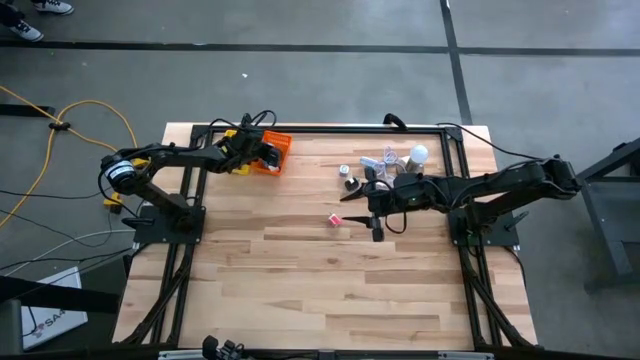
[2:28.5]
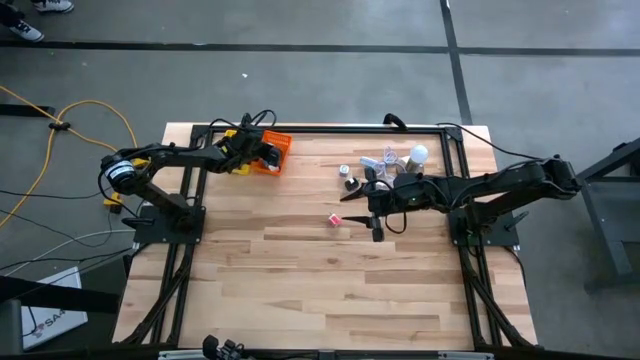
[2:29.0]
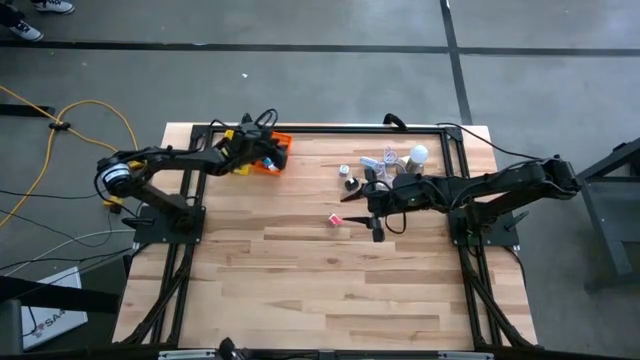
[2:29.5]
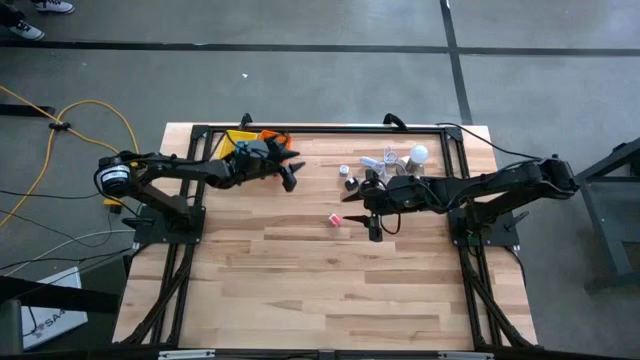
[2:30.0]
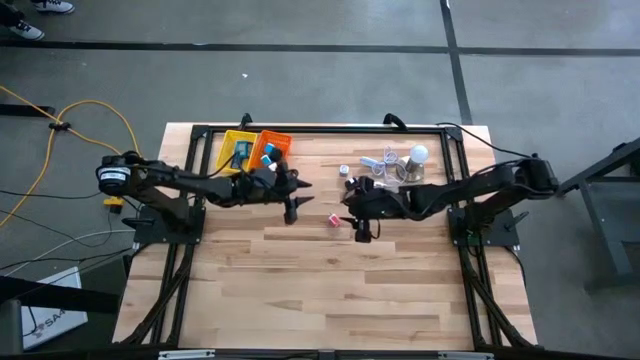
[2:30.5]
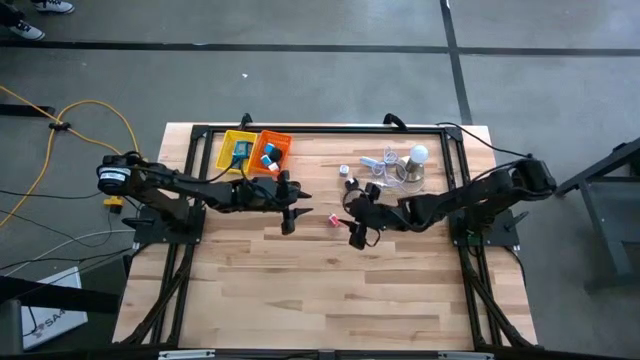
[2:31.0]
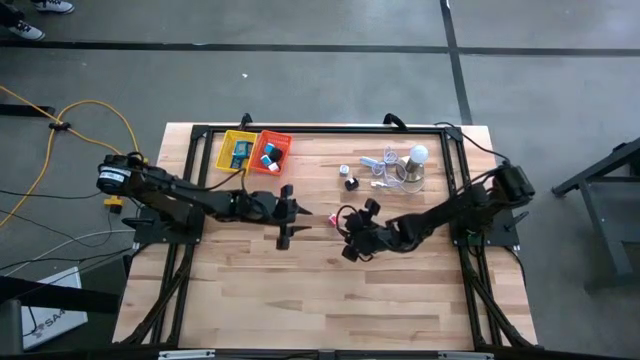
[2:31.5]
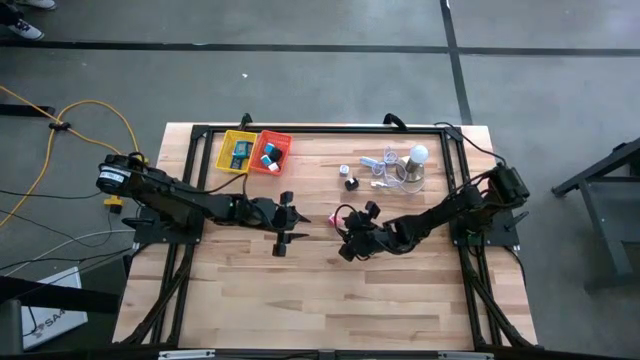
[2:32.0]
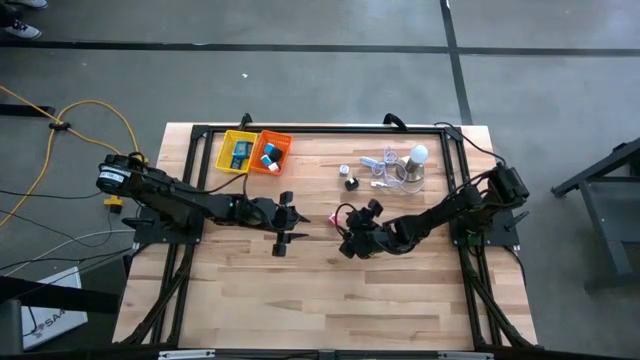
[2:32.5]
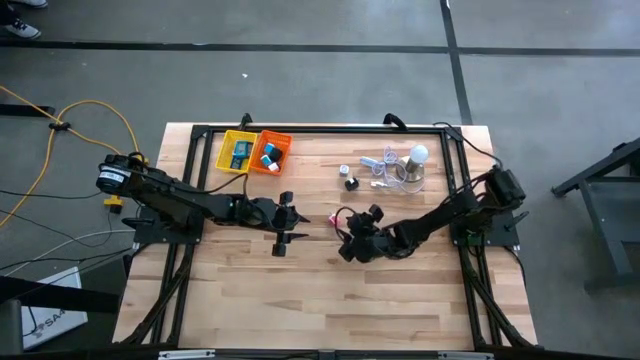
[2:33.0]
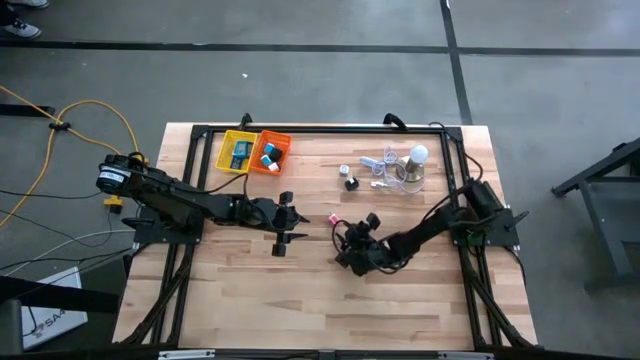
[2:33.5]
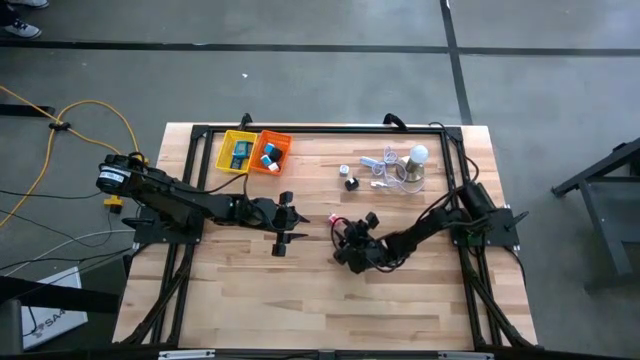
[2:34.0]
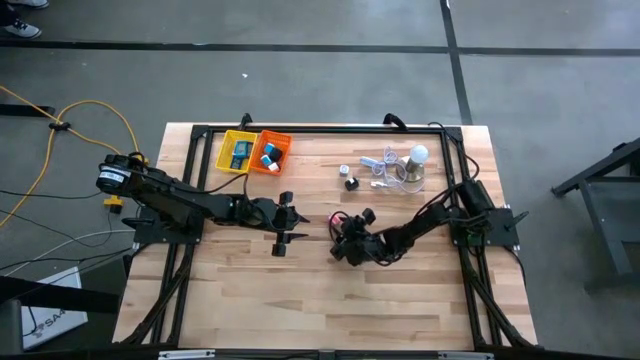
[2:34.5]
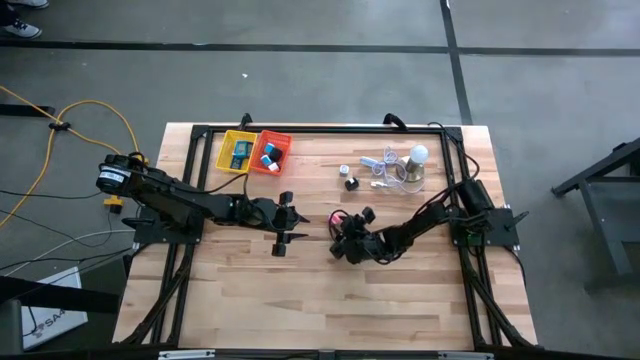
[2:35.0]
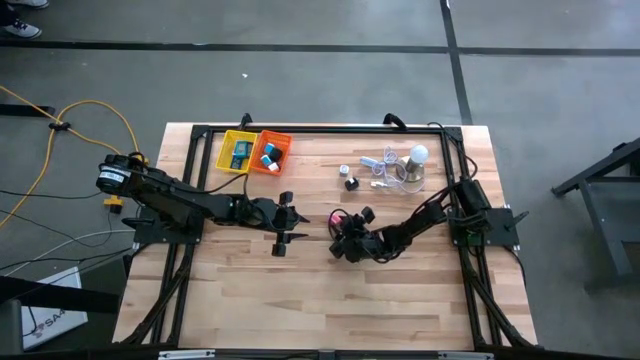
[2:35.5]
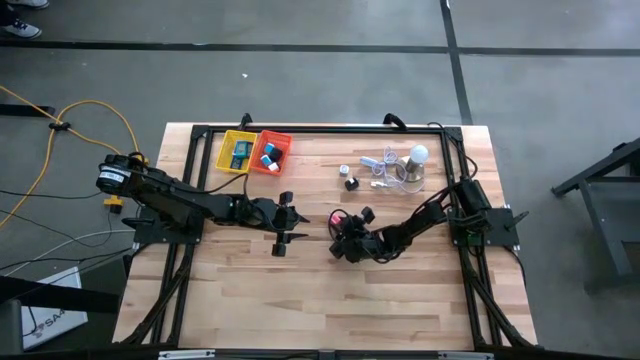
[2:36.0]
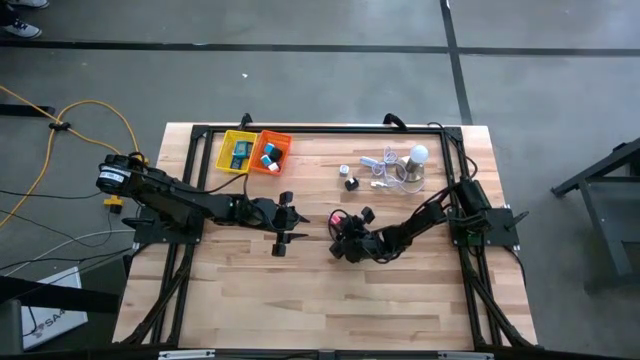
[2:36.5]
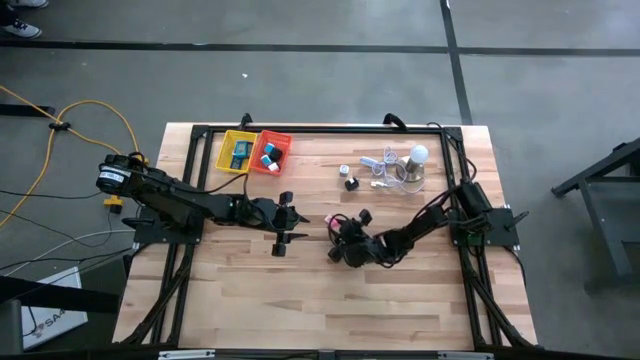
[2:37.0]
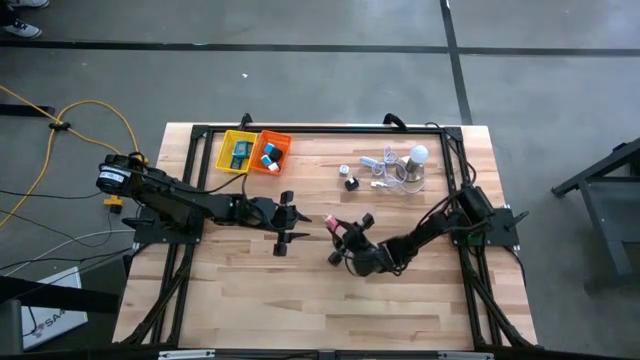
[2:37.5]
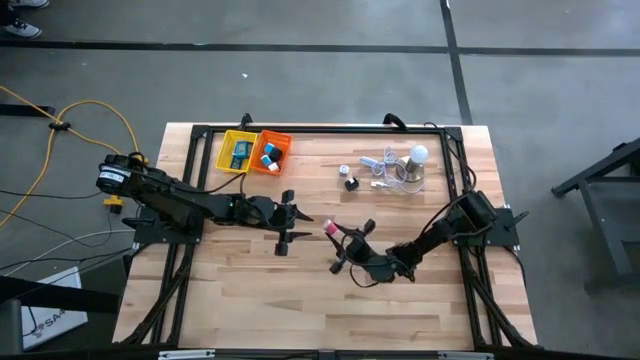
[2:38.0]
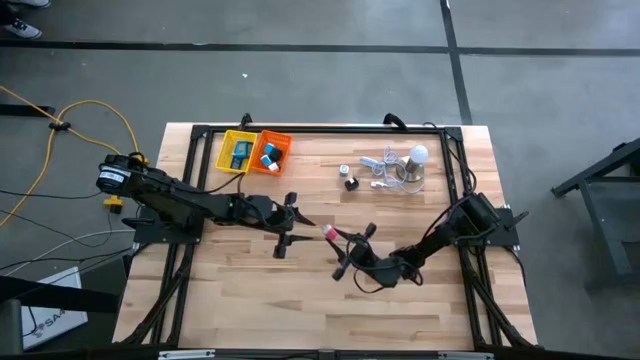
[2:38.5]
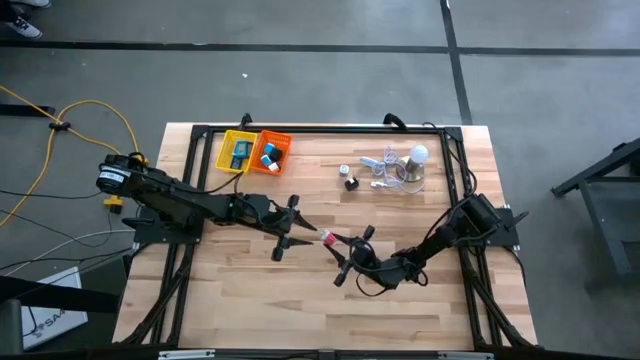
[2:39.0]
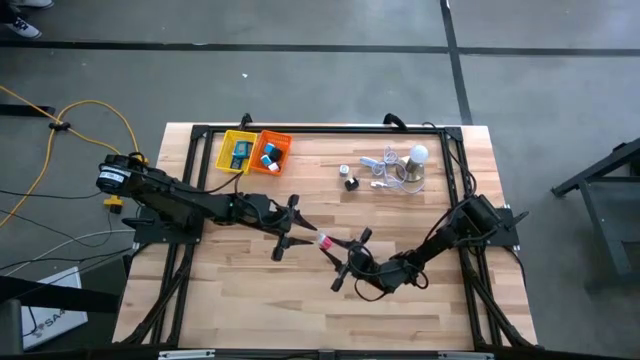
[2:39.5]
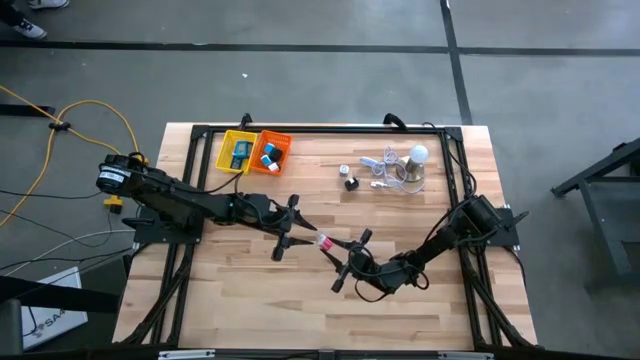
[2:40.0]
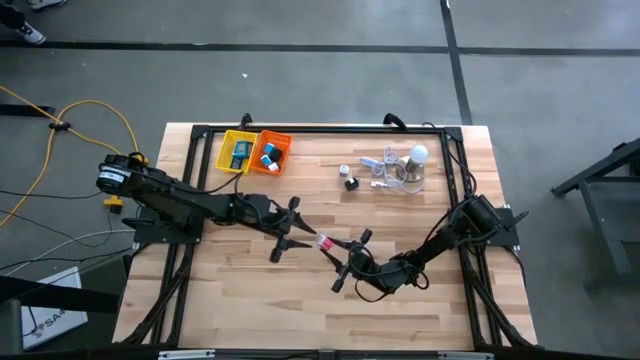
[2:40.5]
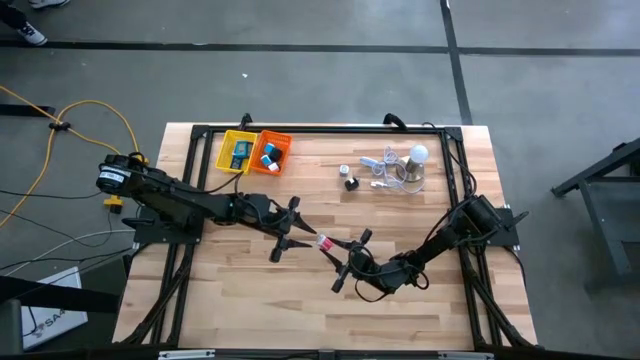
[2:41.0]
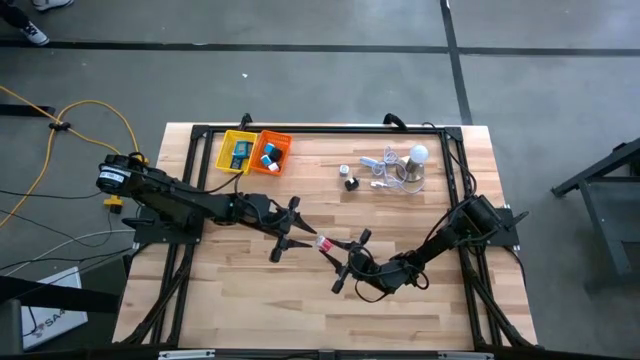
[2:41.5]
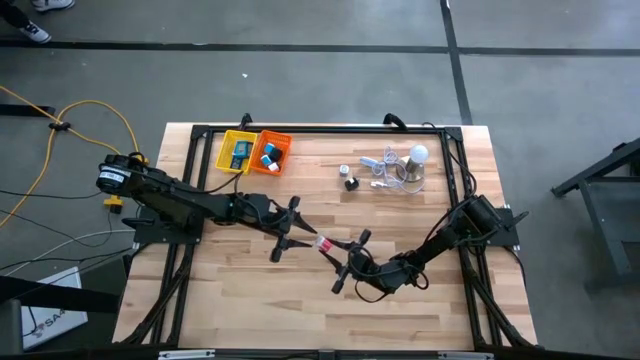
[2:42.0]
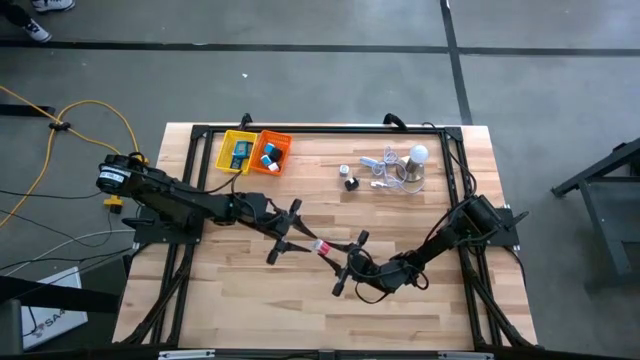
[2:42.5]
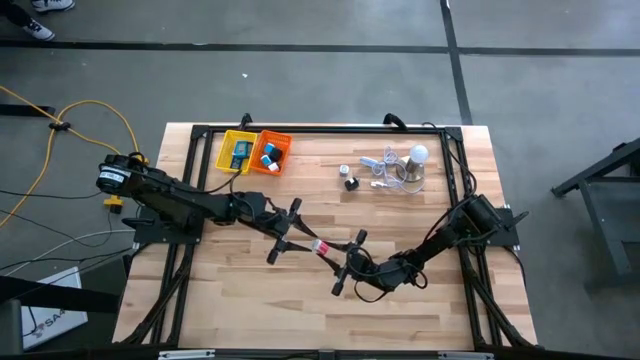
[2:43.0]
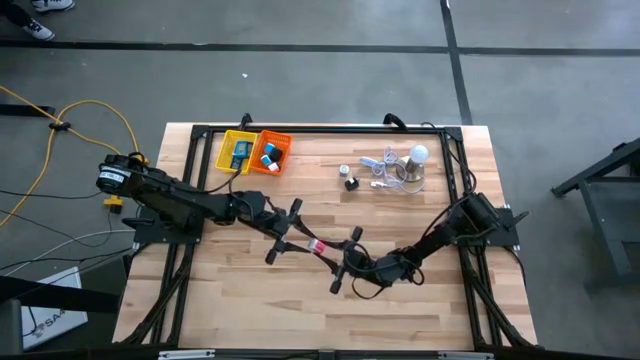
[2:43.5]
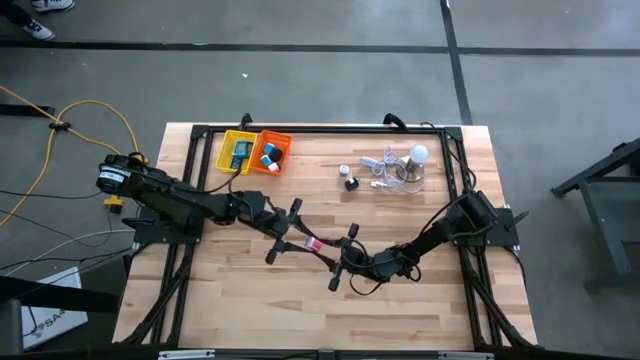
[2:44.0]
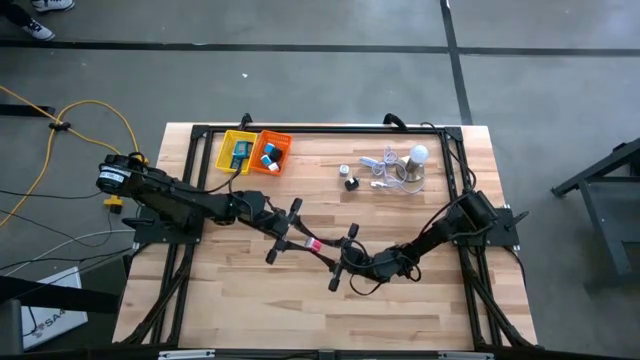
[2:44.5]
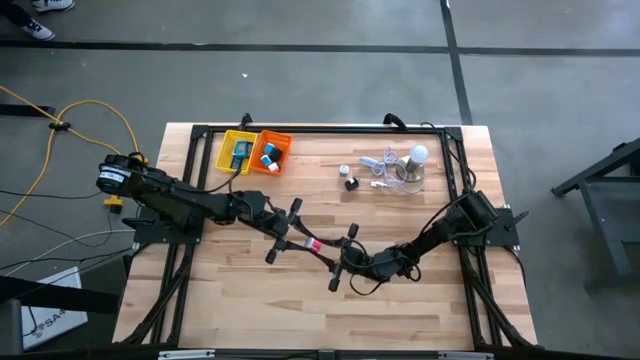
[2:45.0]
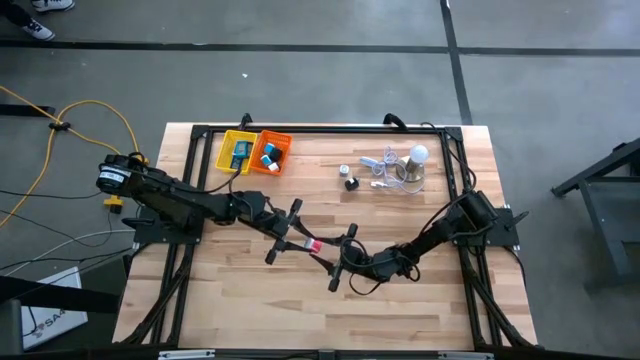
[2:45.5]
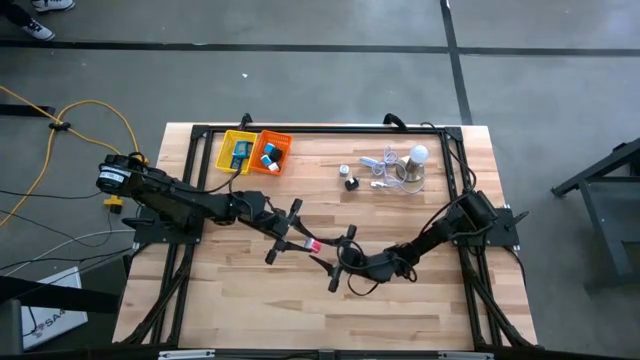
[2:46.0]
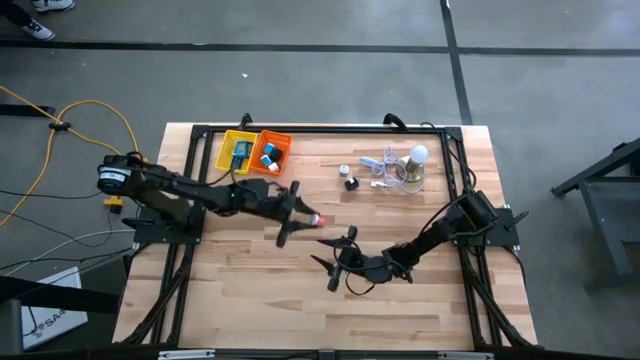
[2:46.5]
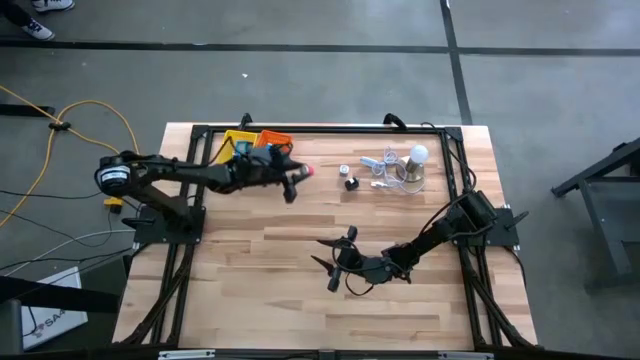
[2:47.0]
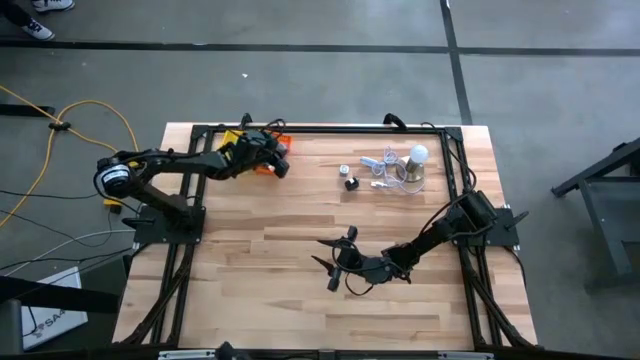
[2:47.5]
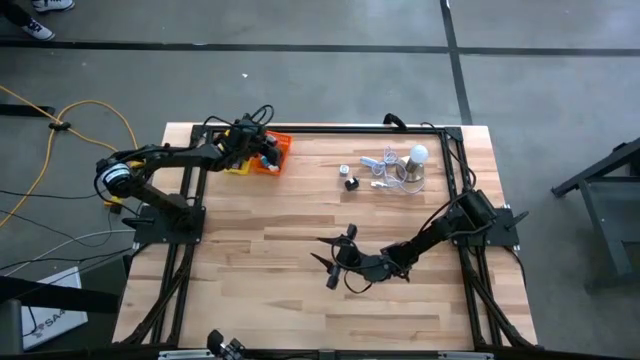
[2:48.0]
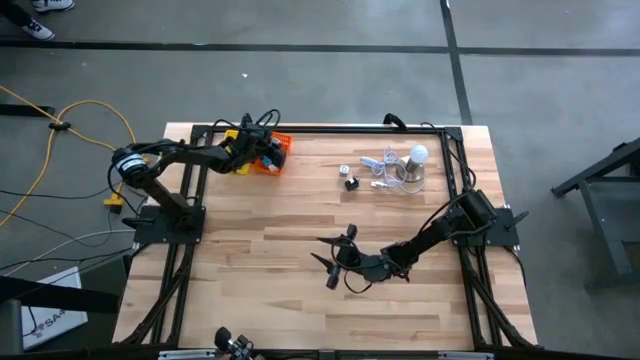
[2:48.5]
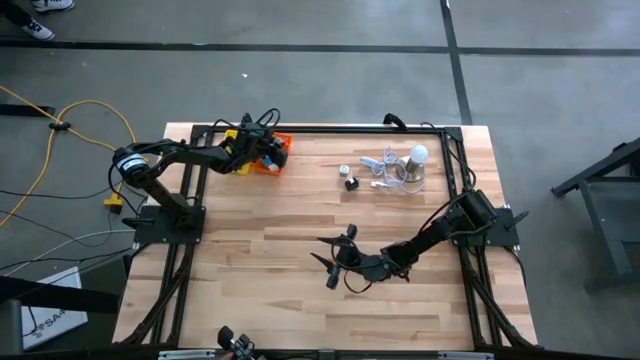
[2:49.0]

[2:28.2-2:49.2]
Task: Pick & Place Office items
Put the pink adapter into the orange basket
